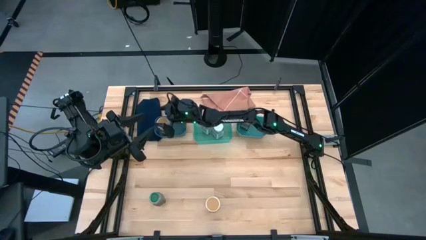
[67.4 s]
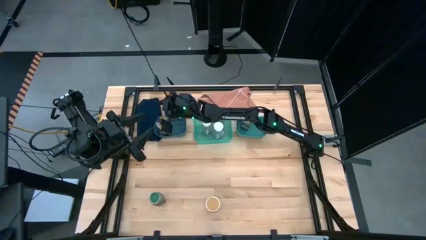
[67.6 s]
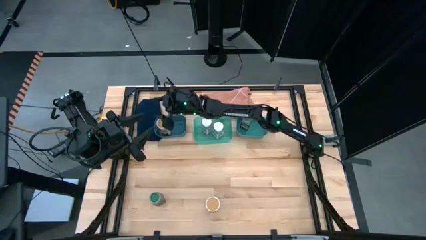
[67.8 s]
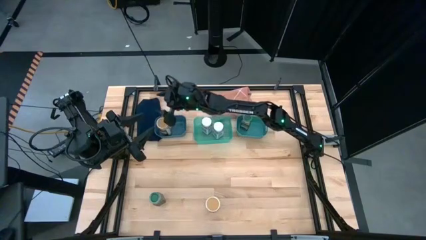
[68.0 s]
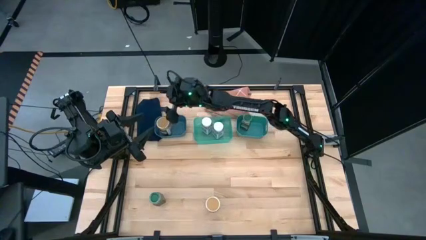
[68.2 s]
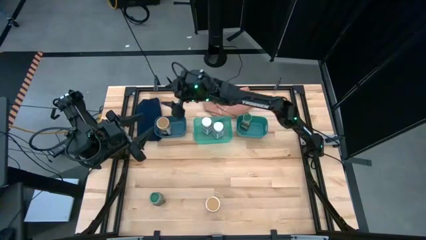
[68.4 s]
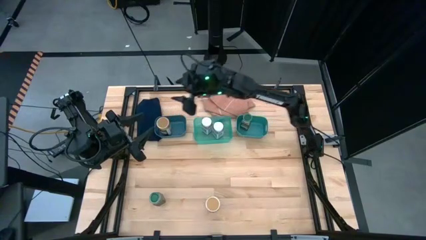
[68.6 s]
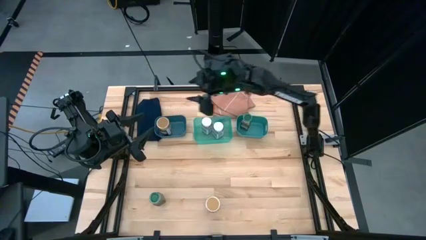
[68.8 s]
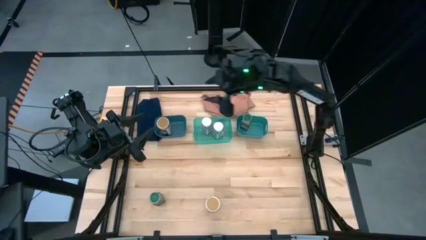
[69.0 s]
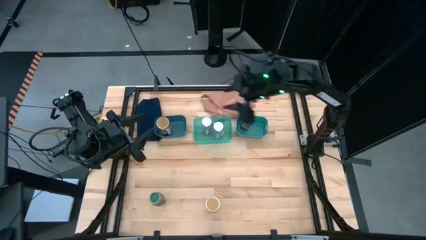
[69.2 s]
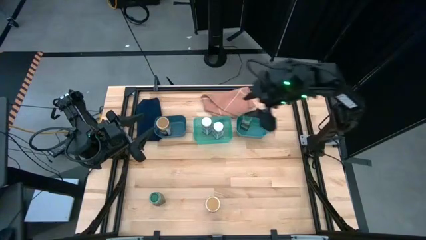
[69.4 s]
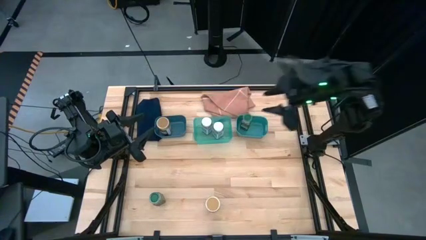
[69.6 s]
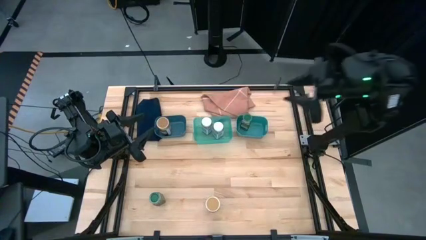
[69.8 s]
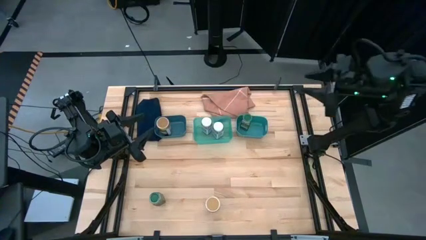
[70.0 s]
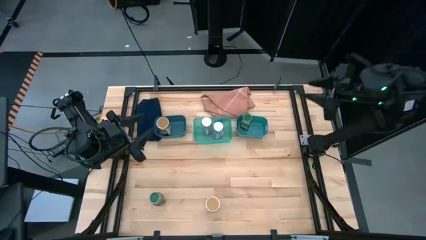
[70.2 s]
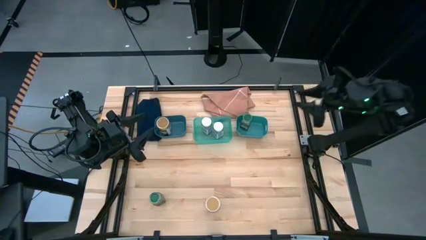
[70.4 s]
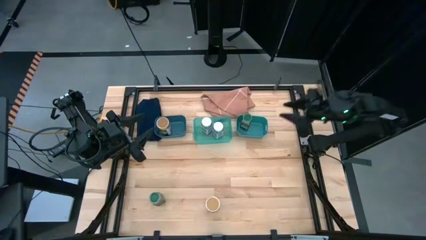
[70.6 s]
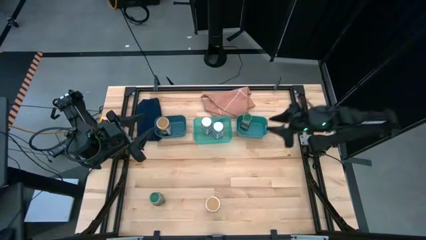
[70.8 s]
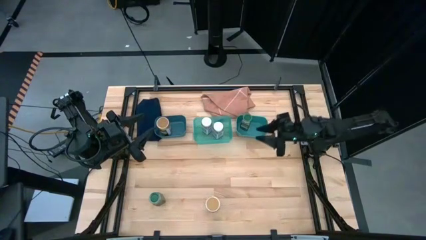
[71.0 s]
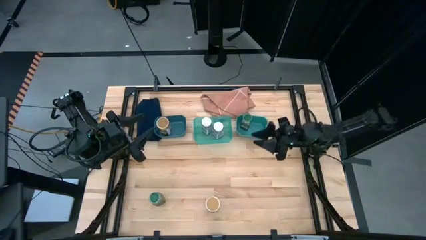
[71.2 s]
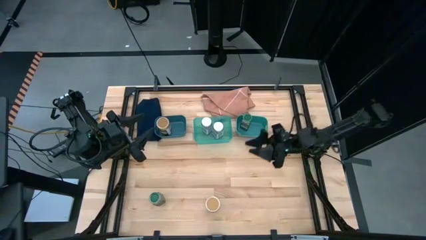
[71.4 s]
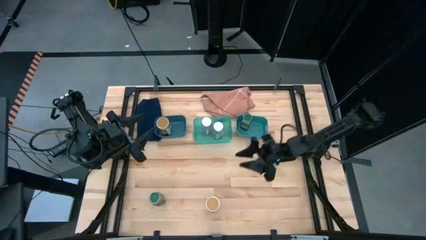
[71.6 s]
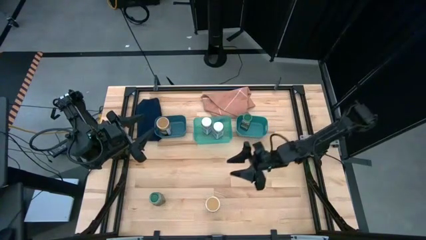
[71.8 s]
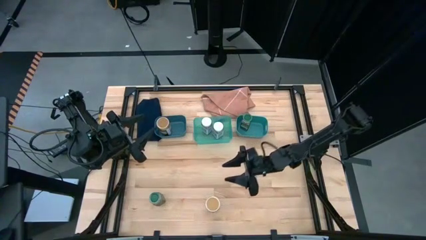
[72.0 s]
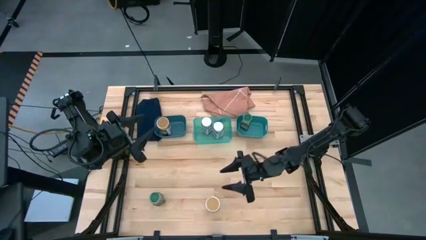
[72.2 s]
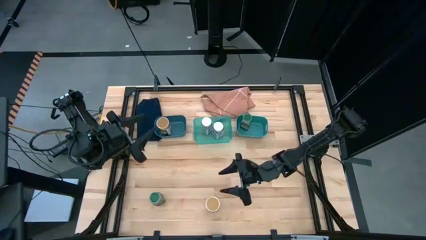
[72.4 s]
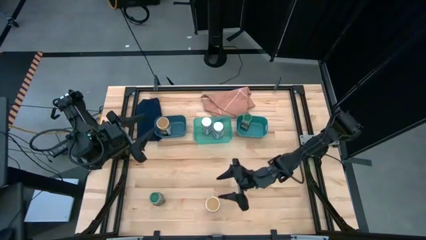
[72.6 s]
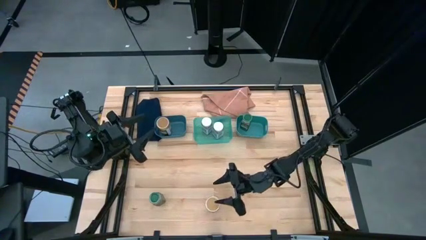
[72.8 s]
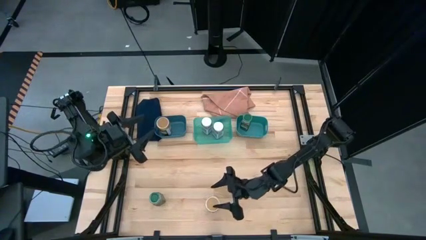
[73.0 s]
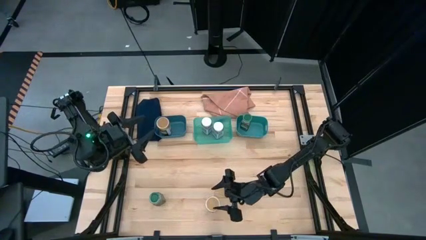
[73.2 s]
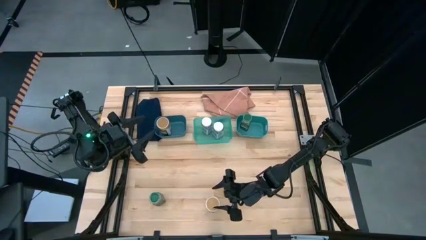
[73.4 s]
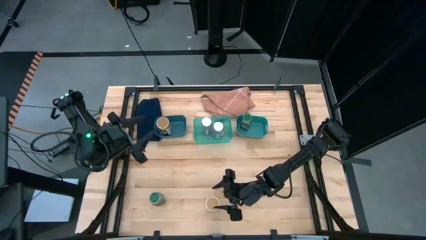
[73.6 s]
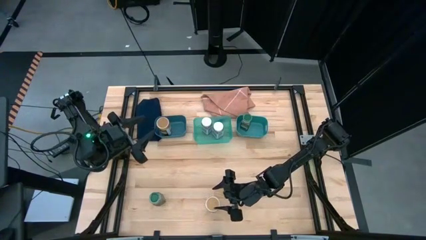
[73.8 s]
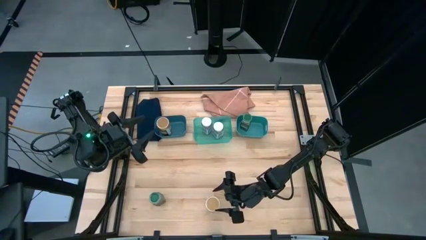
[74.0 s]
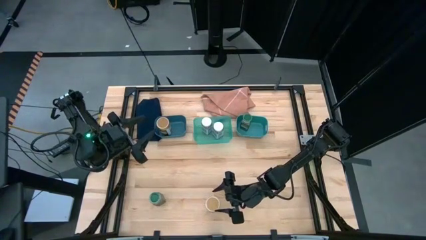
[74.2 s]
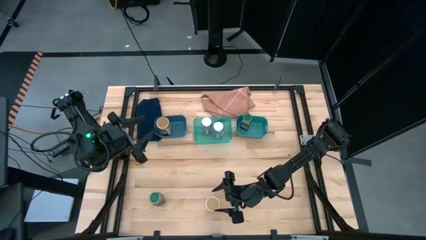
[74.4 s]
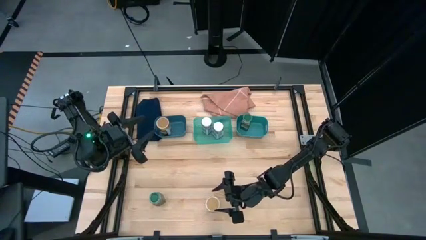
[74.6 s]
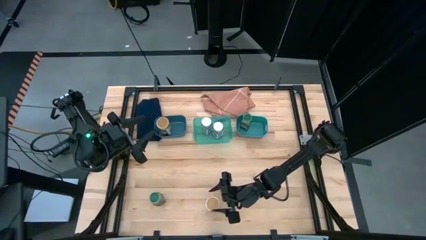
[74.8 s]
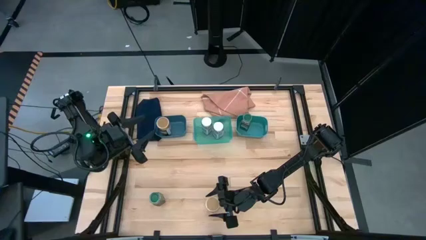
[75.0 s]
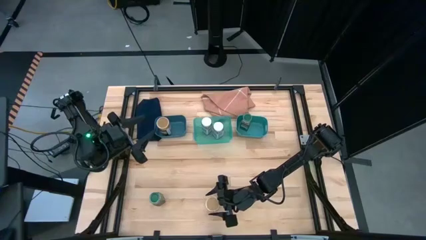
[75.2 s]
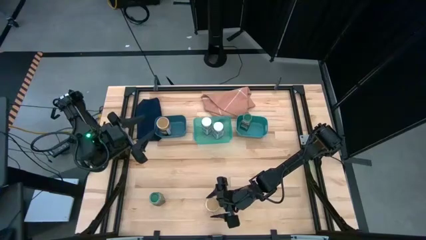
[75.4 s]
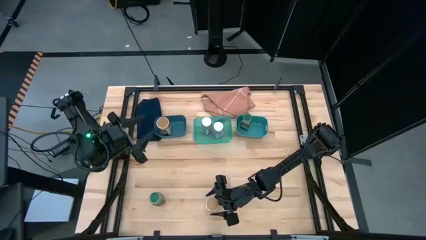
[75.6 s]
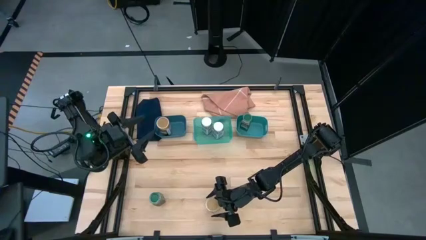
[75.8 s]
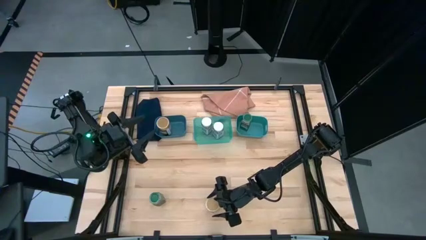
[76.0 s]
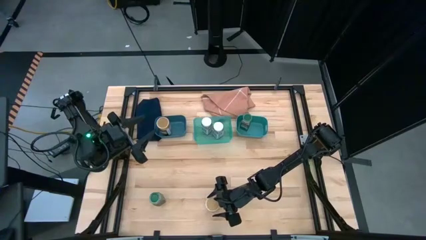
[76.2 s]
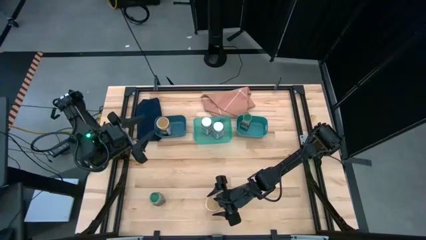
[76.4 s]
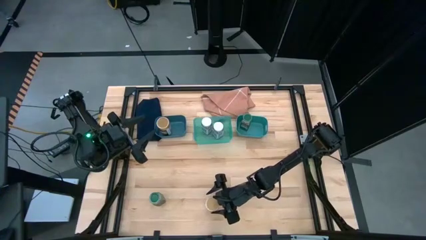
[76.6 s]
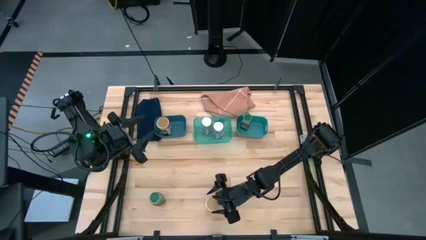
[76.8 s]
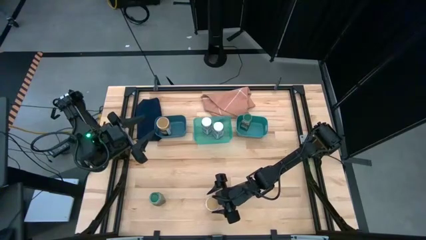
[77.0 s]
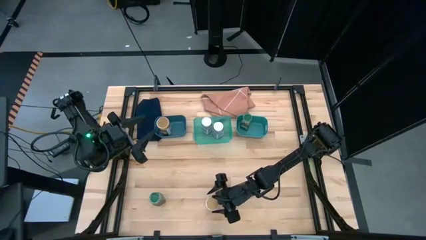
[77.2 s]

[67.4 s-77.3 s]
Task: Sort spices by type
Put the gold seasoning bottle into the blue bin
